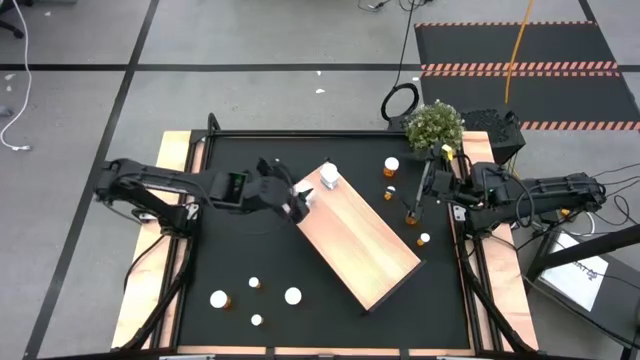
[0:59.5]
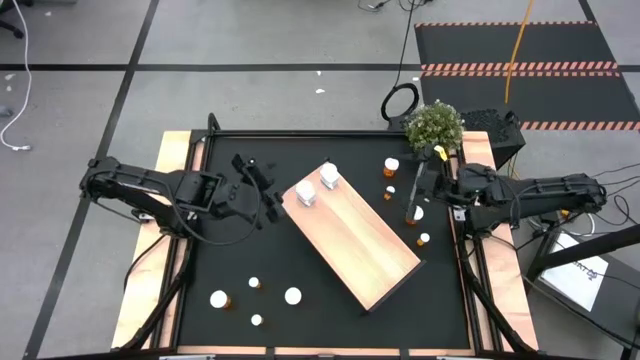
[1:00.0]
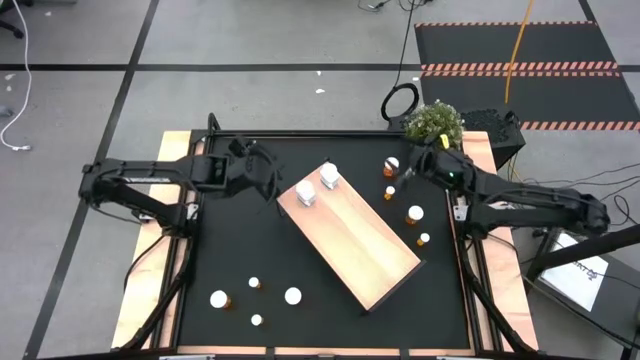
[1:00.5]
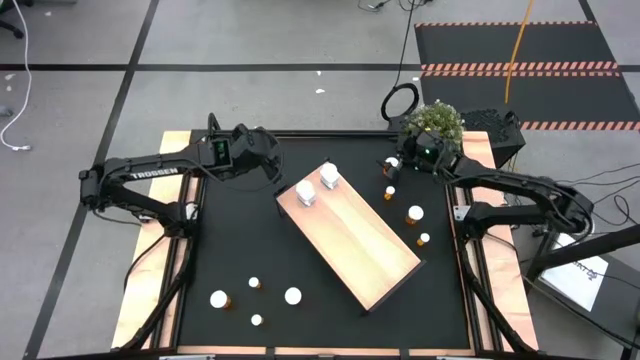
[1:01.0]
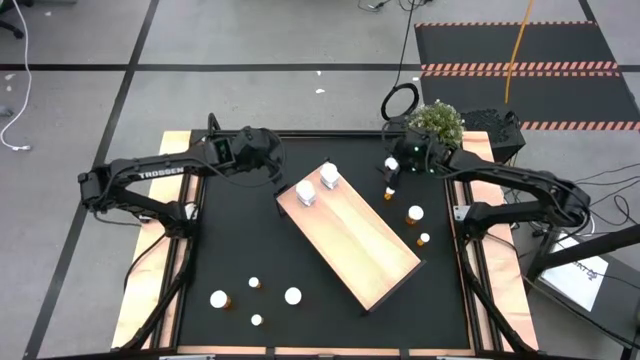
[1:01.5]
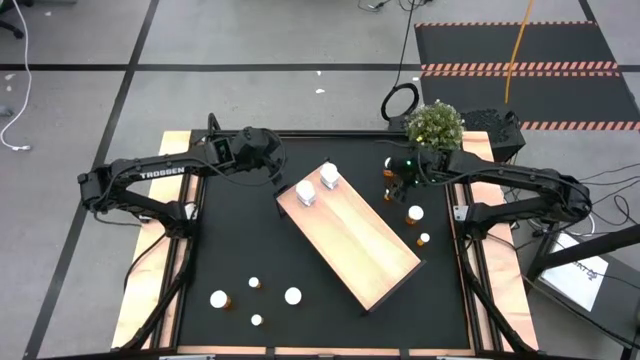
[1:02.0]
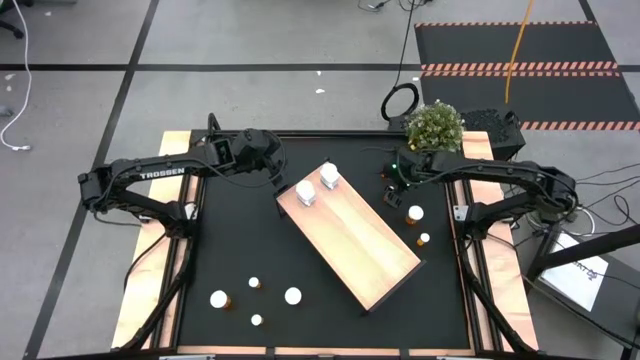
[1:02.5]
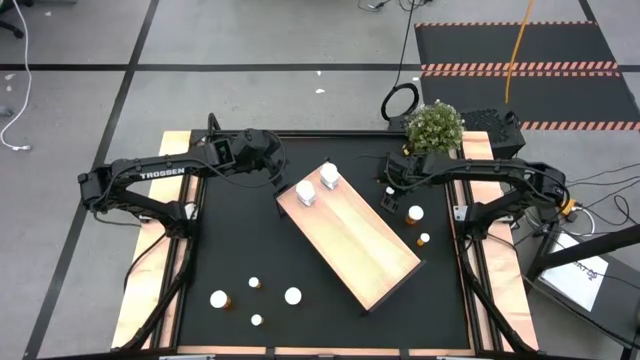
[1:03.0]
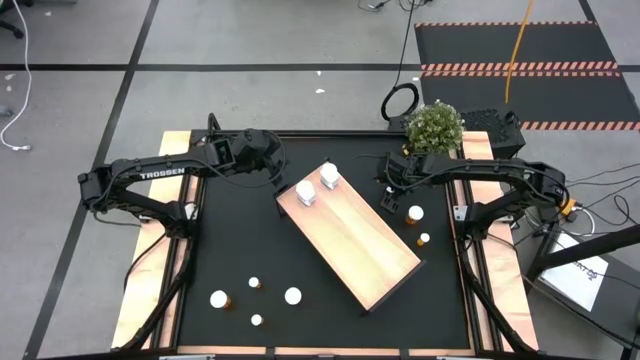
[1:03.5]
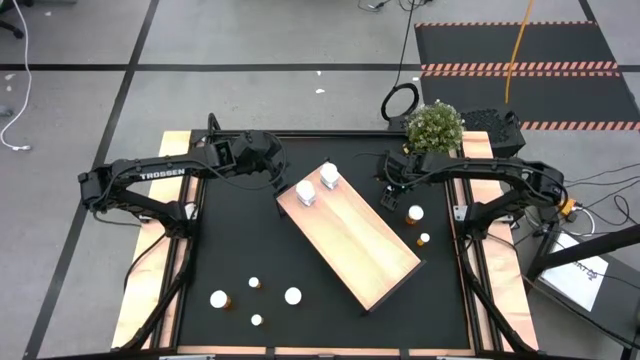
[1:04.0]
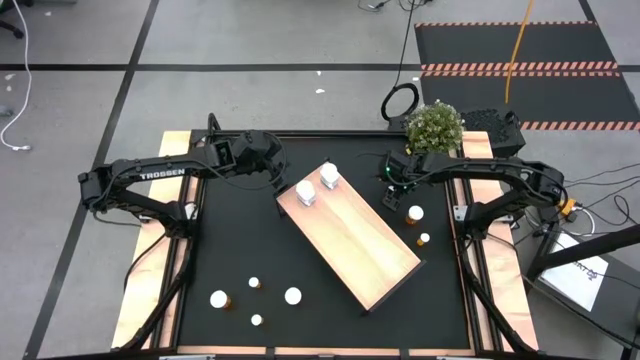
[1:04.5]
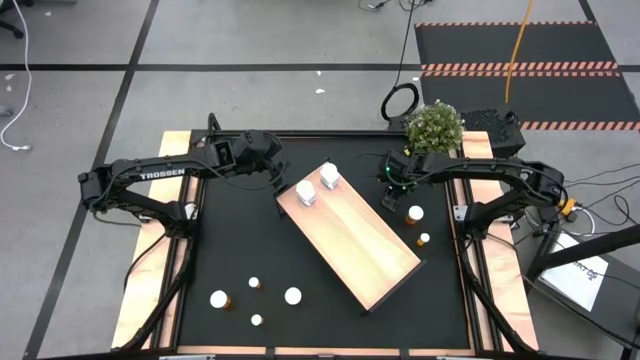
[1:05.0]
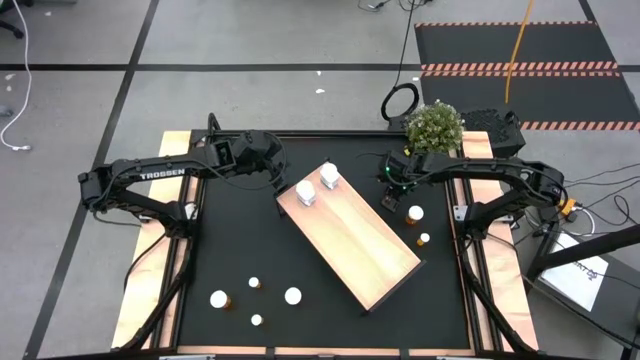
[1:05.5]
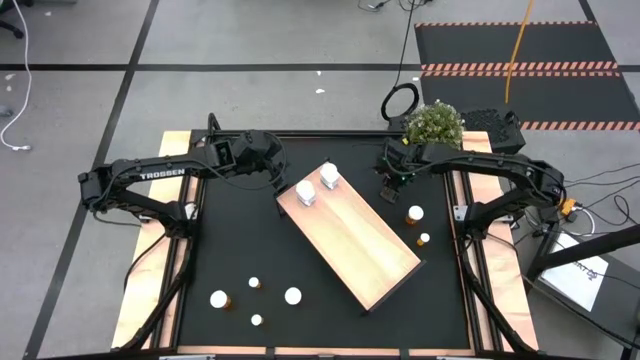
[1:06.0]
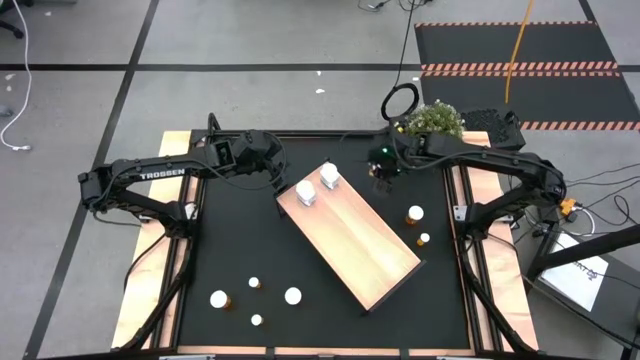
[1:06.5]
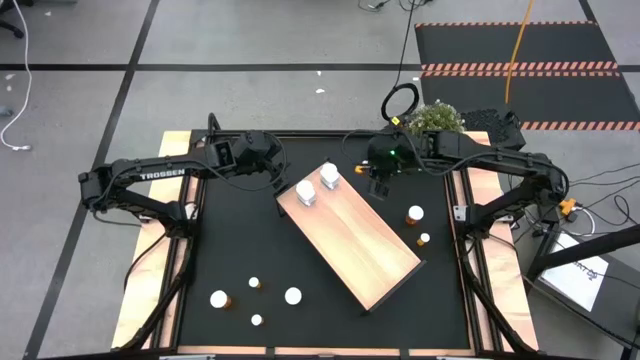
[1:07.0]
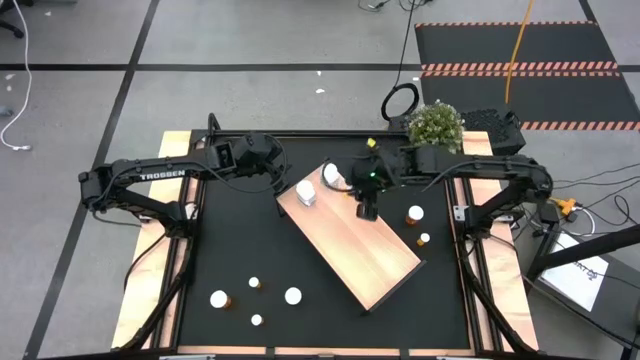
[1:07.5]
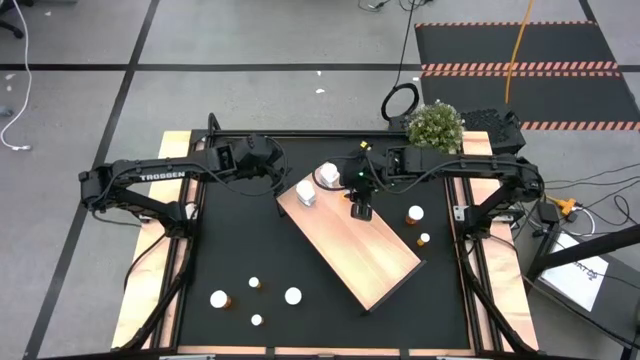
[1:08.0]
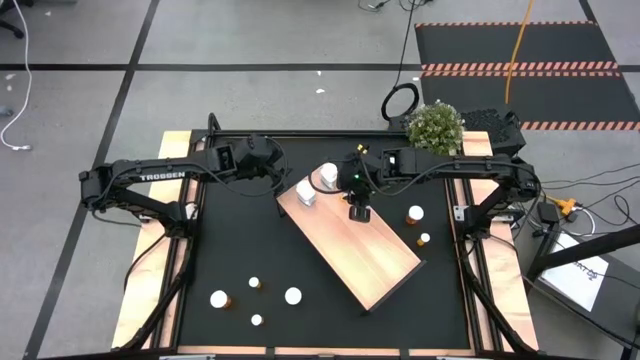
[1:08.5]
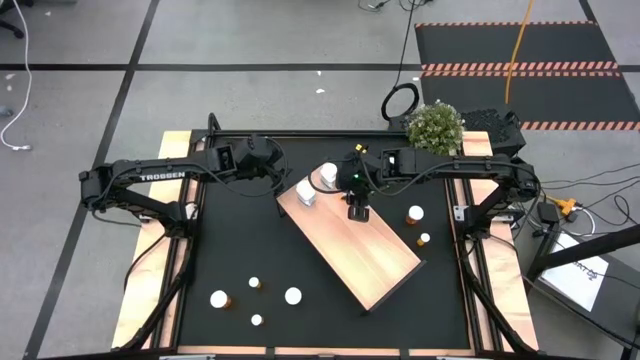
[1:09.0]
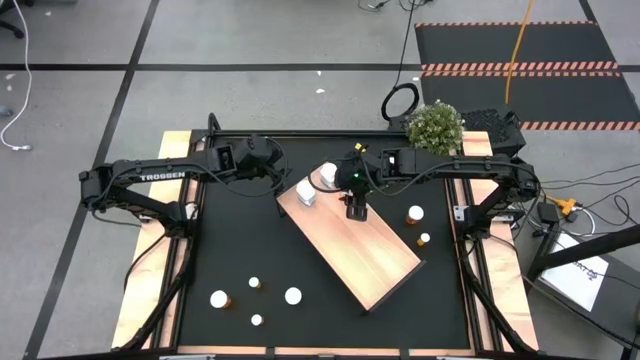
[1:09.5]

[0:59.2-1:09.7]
Task: Pick and place medicine bottles onto shelf by color
Put the small orange pill bottle on the shelf

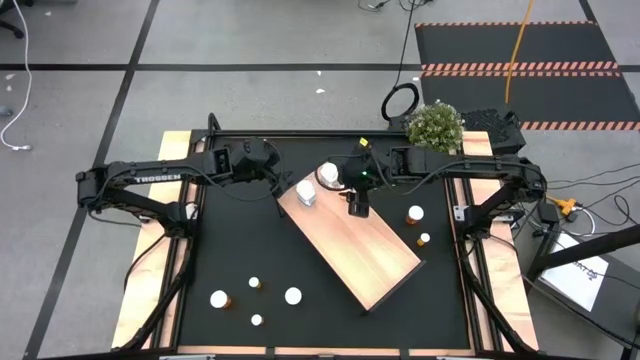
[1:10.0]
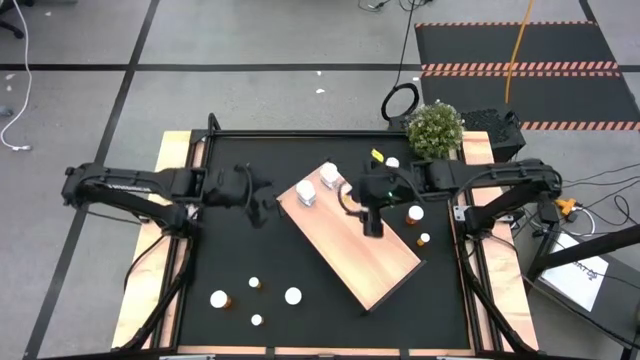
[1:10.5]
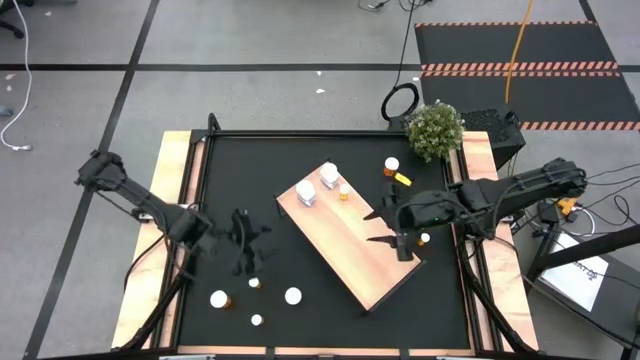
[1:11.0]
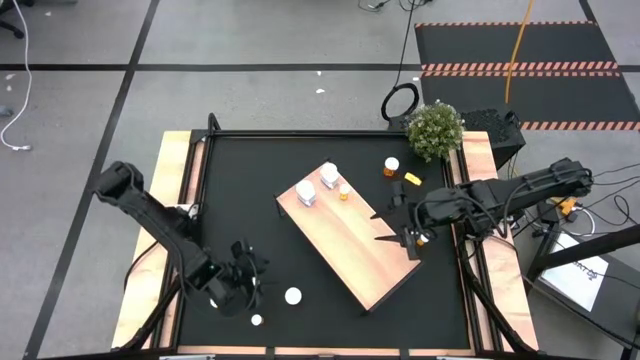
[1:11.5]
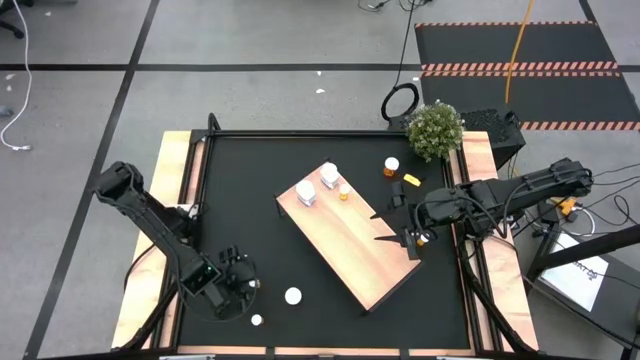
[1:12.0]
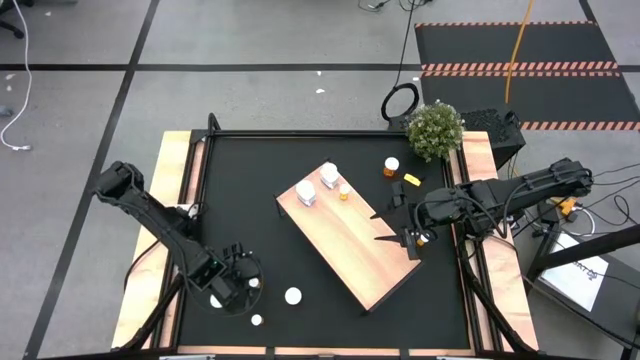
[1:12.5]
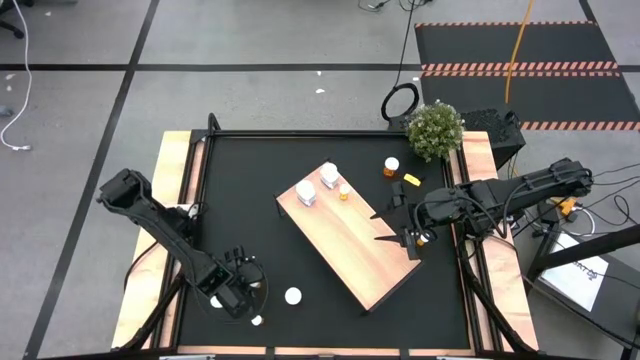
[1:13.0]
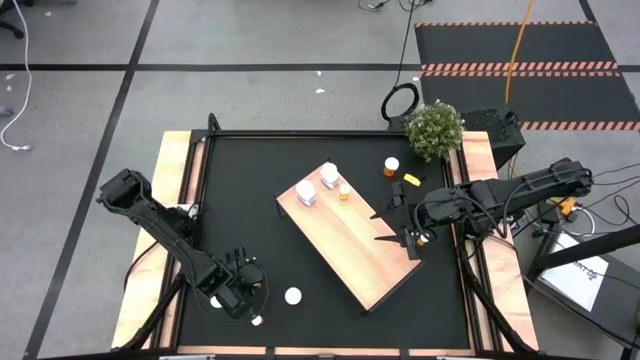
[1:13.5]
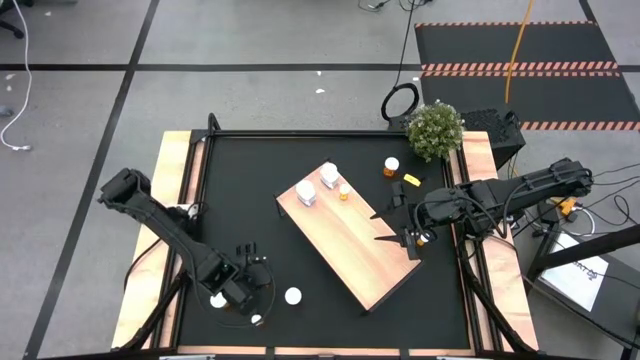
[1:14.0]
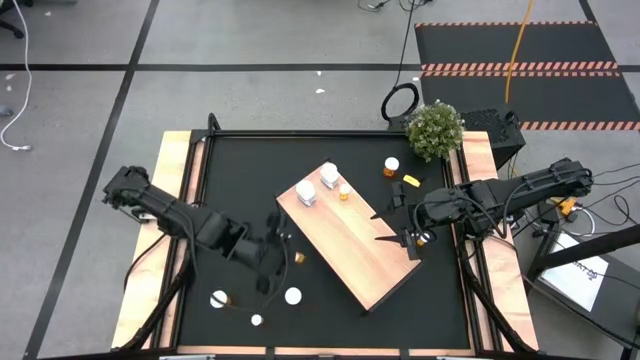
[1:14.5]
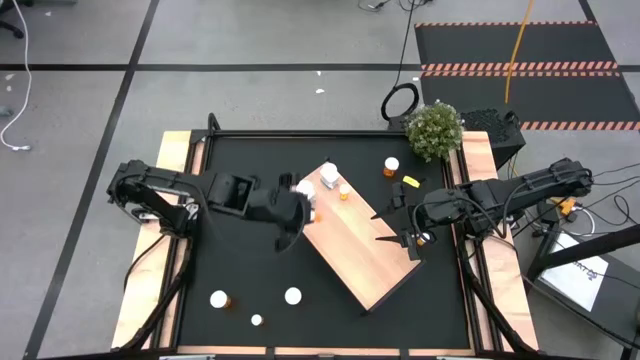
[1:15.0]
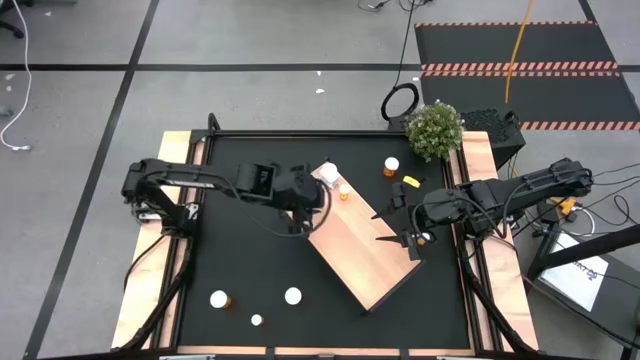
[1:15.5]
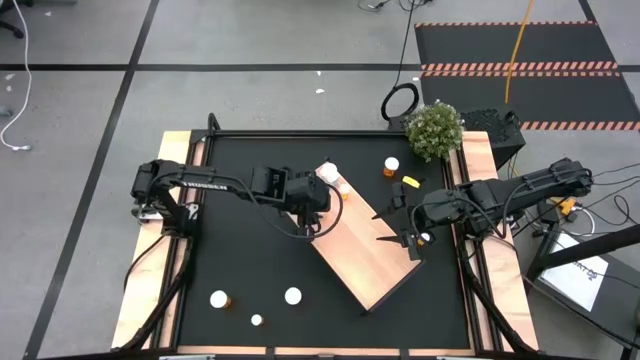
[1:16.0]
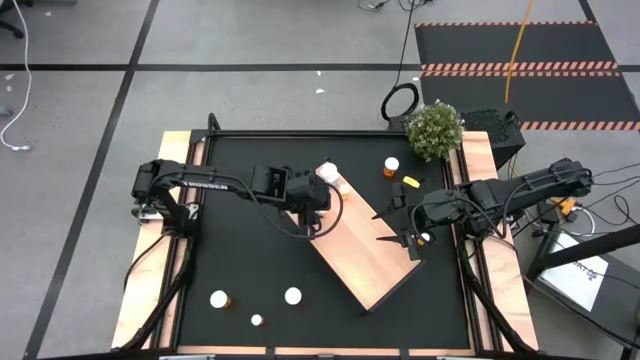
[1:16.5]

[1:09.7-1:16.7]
Put the small orange pill bottle on the shelf aligned with the other small orange pill bottle

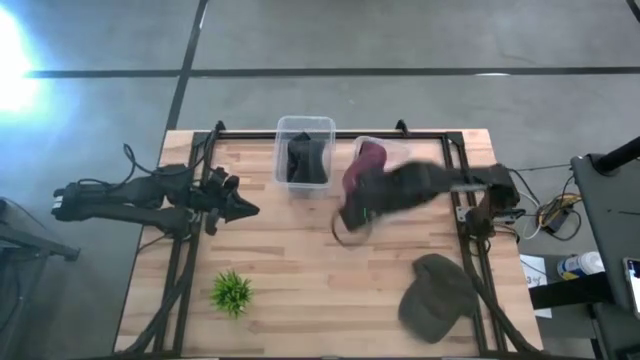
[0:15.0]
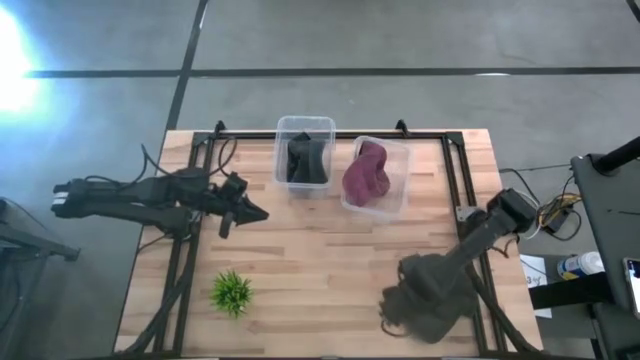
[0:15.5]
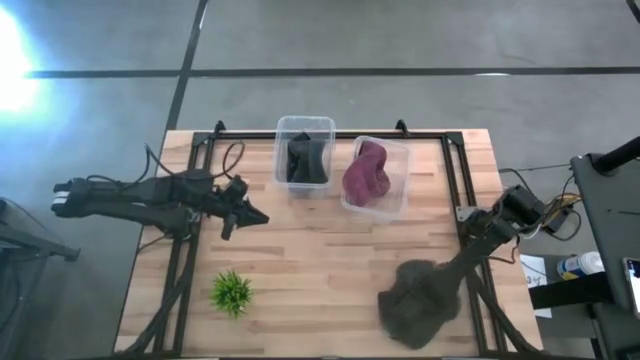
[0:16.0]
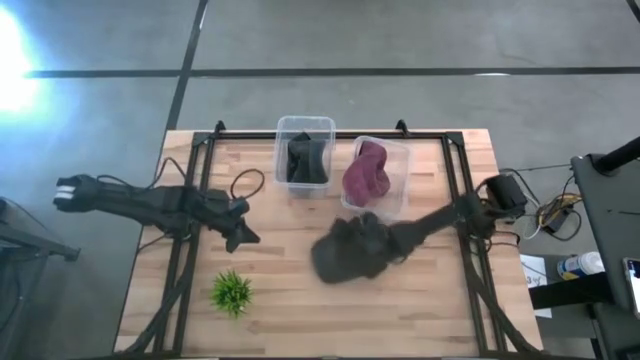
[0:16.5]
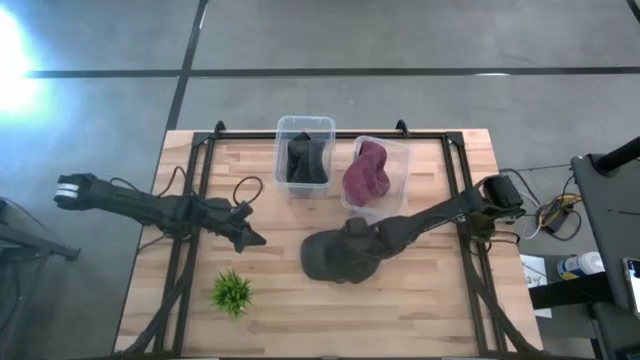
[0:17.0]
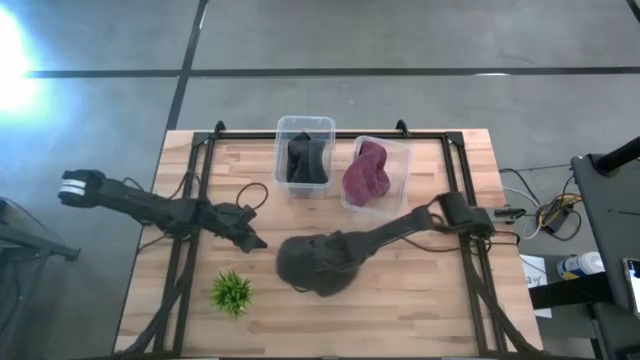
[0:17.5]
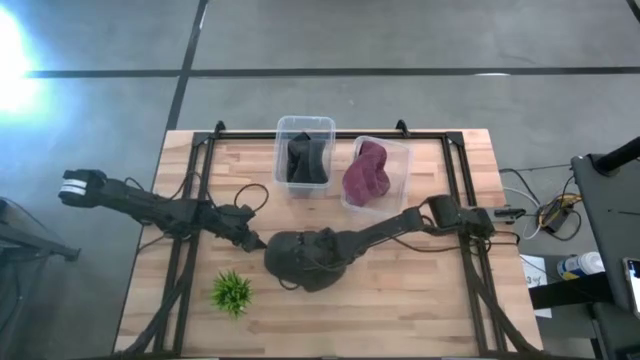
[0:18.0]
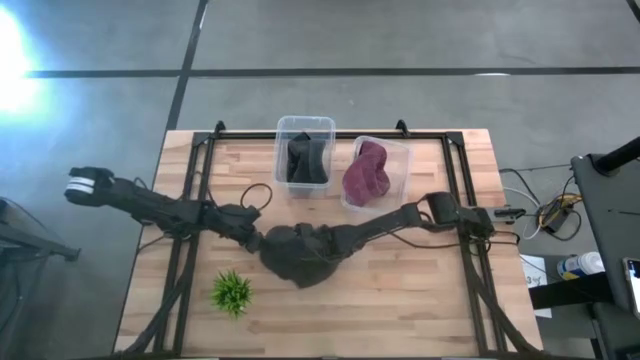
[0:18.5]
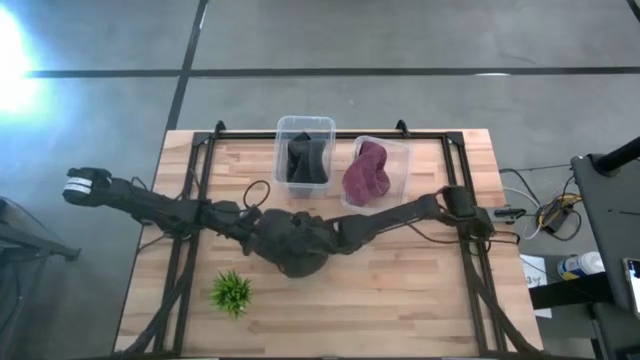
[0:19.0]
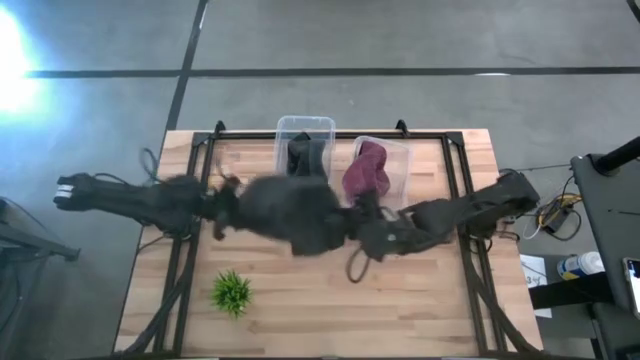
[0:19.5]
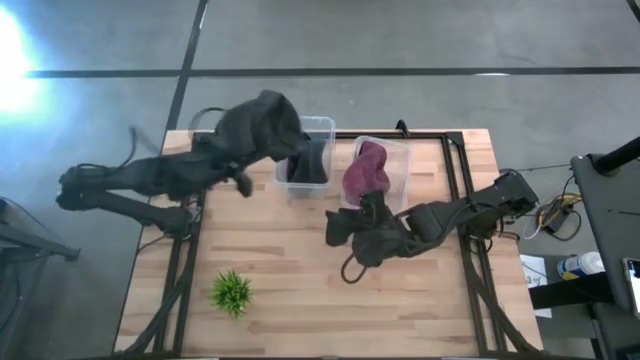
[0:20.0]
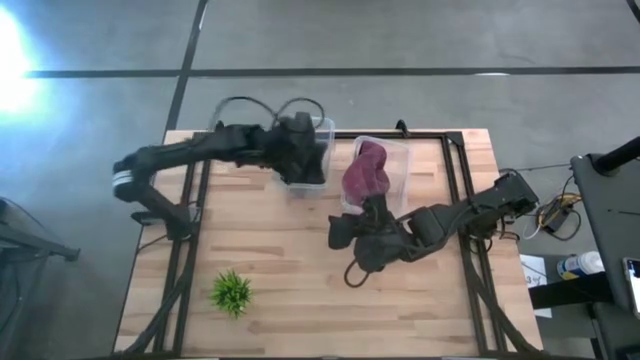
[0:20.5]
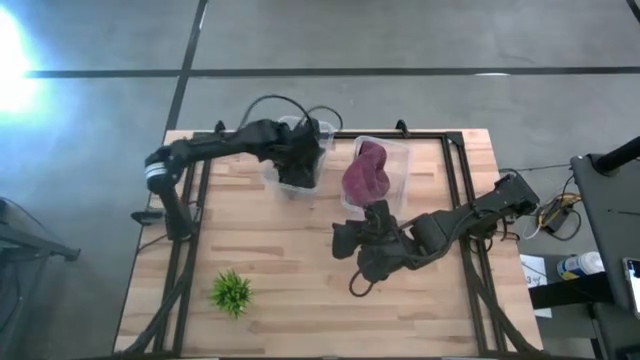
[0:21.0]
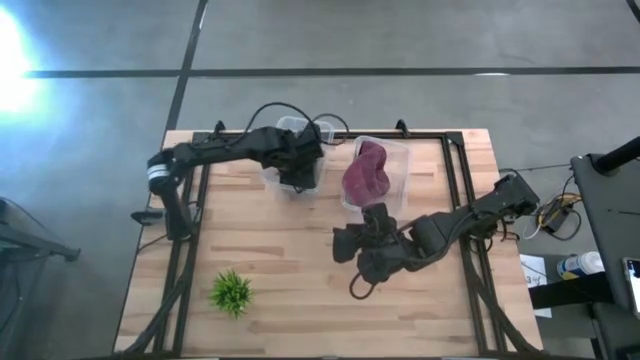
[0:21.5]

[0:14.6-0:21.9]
Task: Pick & Place hat
Put the black cap into the left transparent bin
